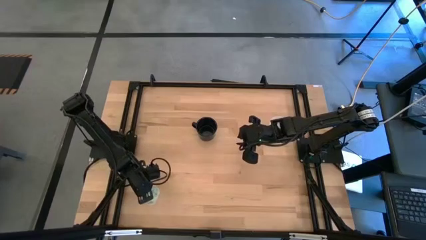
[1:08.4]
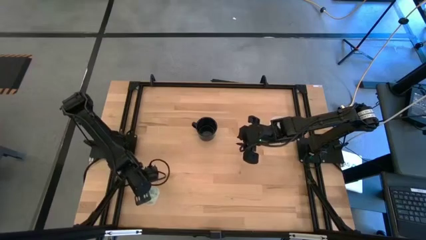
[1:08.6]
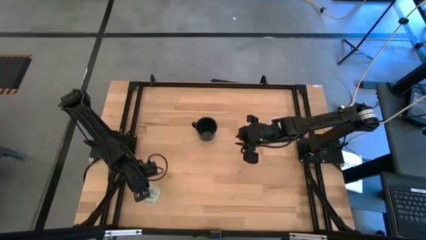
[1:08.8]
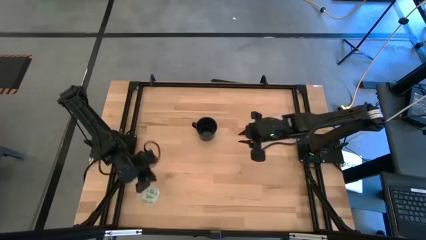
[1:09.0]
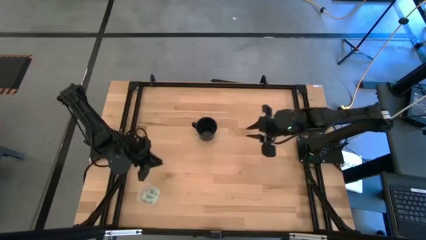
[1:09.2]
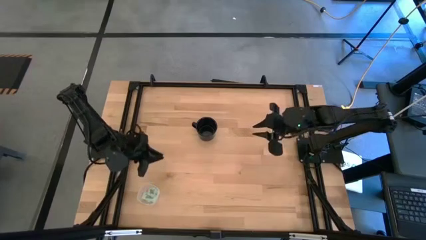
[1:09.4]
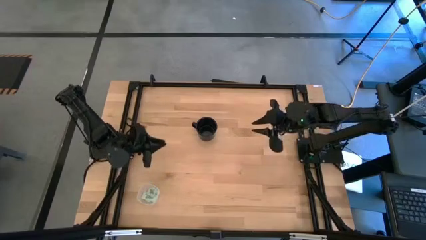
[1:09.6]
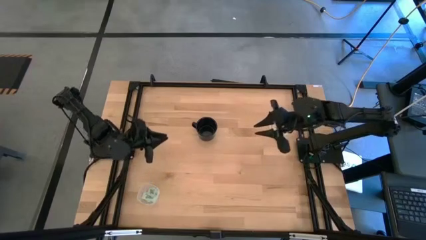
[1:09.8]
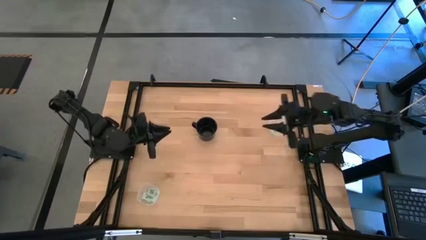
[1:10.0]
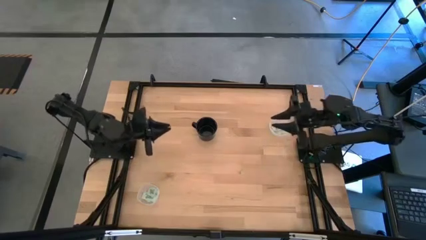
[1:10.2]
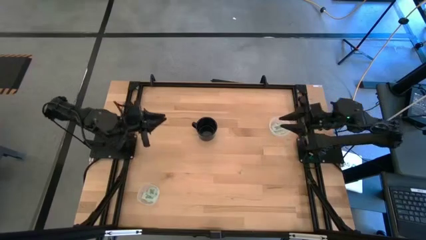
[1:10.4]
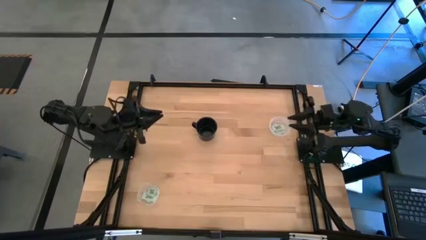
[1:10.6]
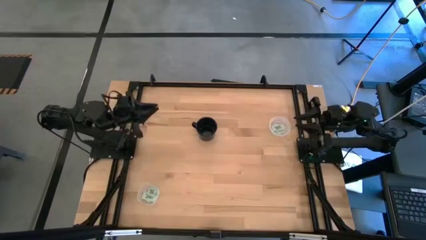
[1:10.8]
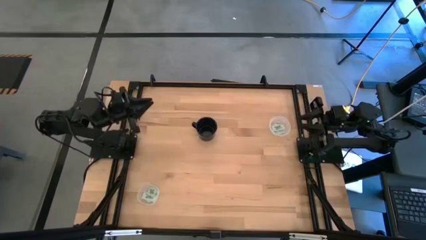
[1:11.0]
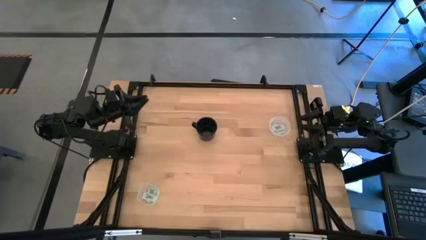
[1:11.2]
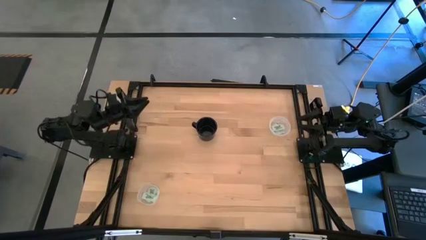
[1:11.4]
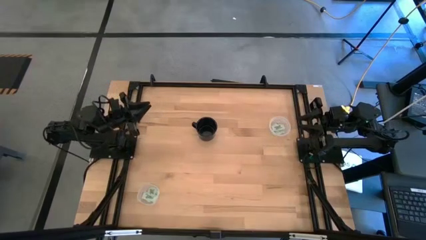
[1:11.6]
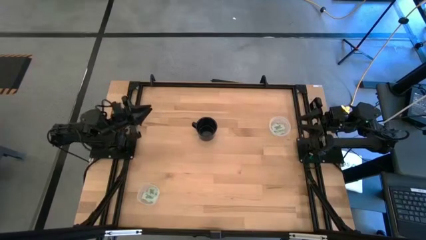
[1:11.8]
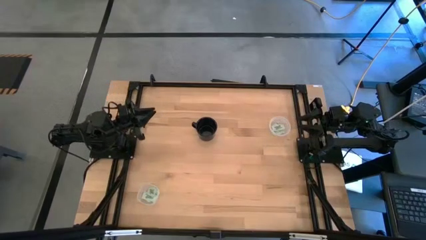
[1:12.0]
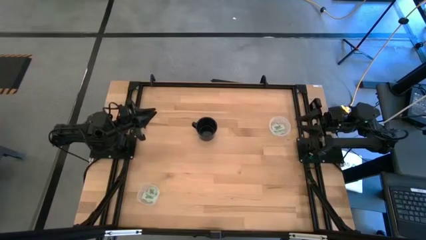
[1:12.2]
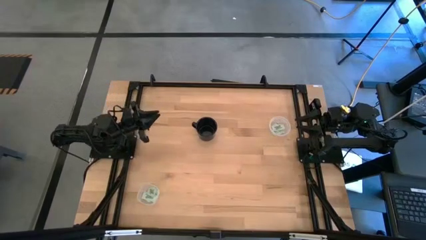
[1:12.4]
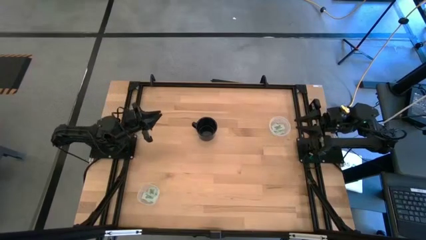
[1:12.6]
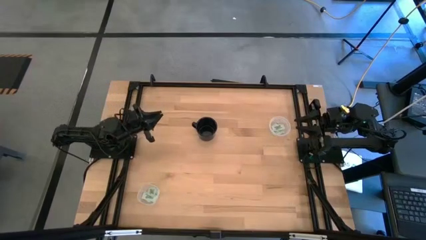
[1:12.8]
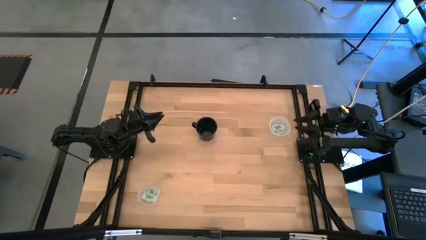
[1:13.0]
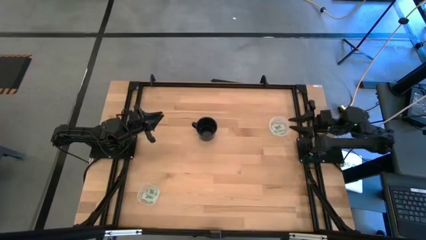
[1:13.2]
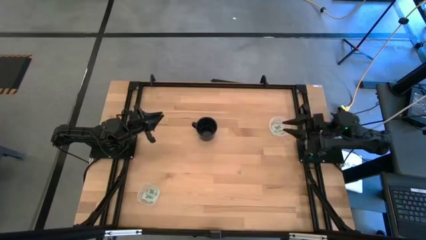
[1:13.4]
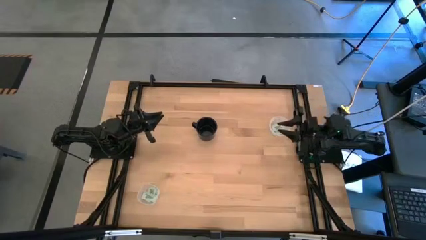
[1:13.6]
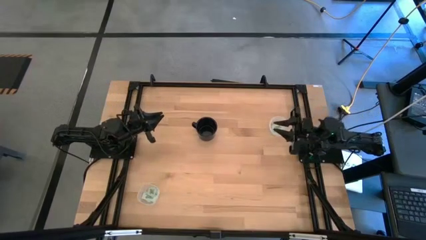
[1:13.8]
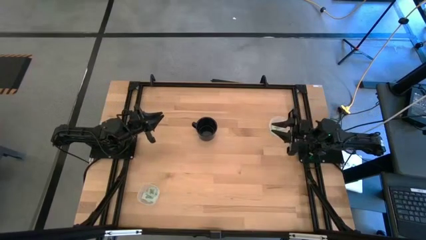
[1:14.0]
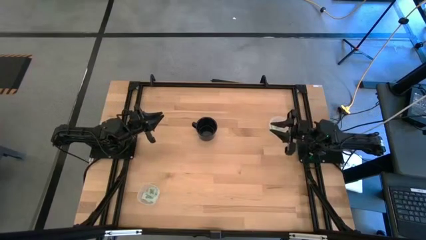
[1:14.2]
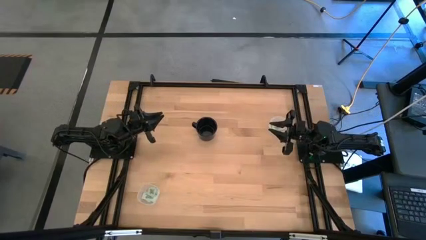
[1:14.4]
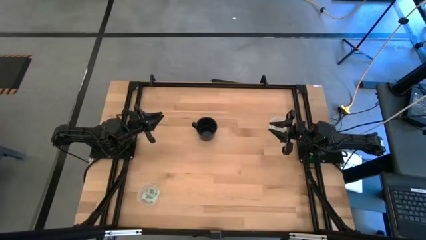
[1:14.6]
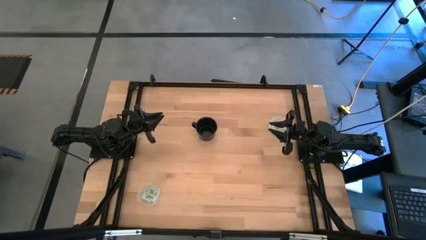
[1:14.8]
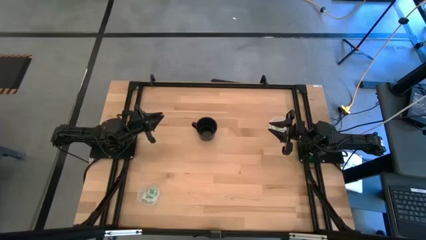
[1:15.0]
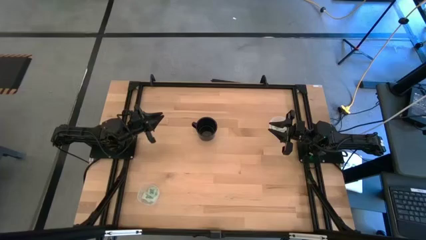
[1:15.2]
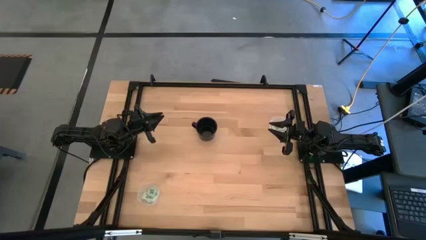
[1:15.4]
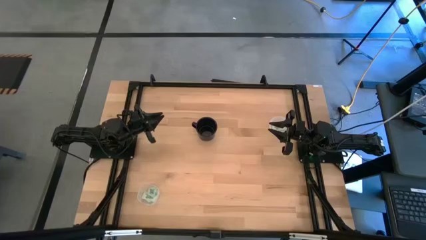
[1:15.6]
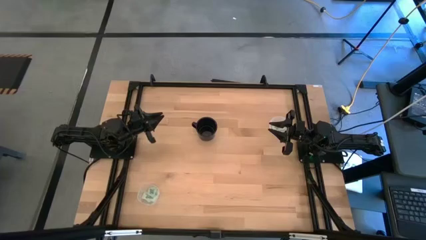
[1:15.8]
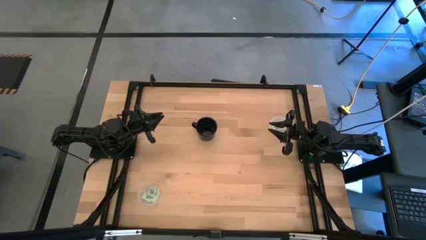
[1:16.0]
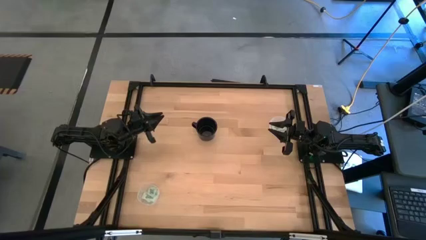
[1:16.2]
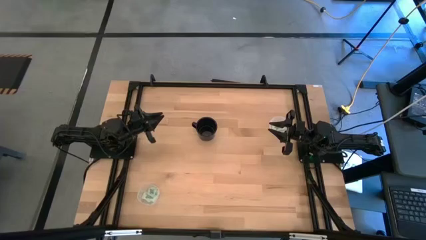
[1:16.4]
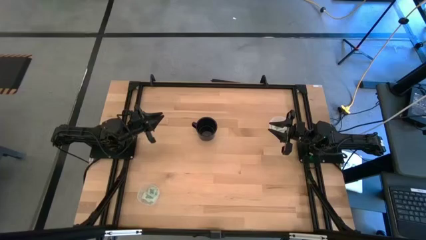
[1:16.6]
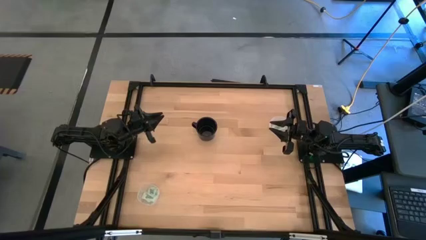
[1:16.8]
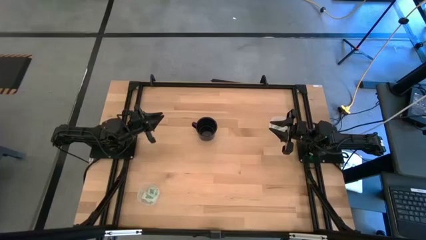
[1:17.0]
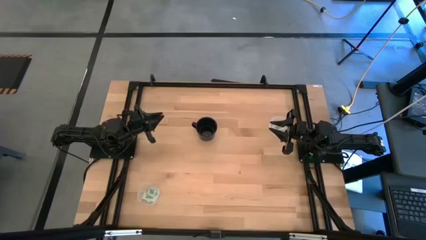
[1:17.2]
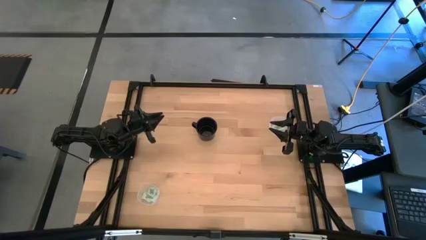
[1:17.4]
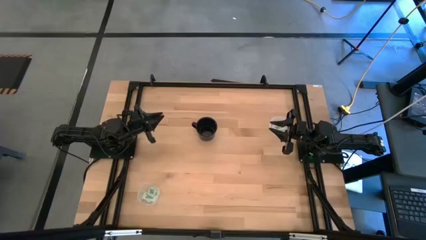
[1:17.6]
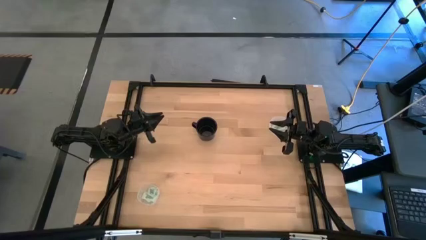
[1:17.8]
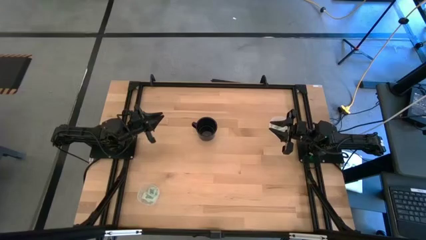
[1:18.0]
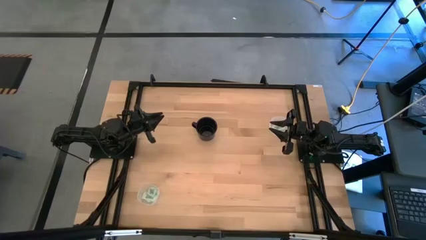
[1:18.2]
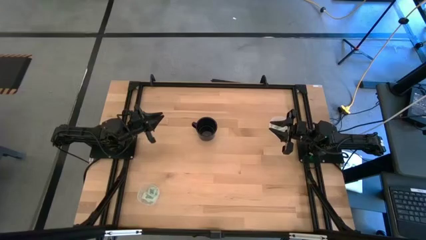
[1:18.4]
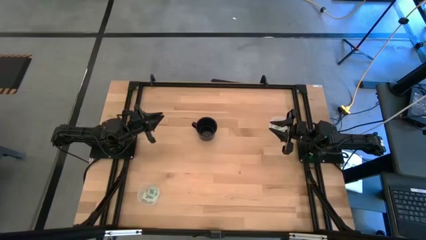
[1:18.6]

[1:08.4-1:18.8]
Task: Pick and place Stevia / Truvia into bins
Return to Home Position

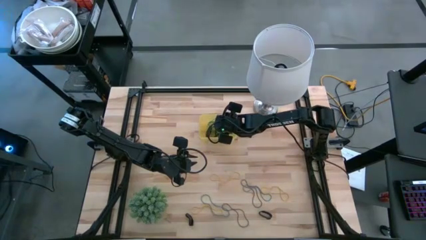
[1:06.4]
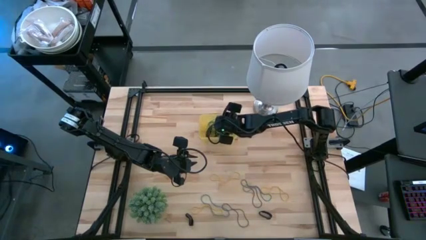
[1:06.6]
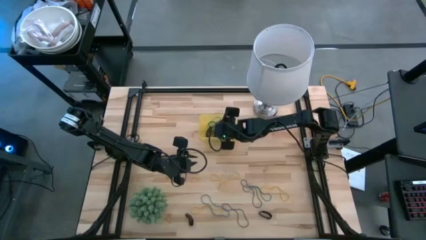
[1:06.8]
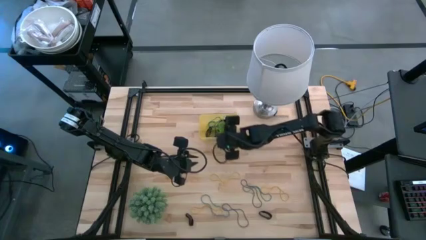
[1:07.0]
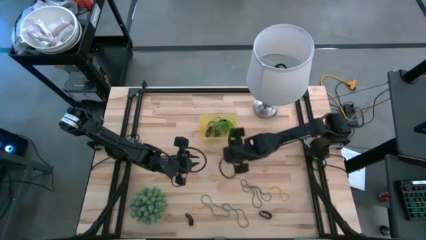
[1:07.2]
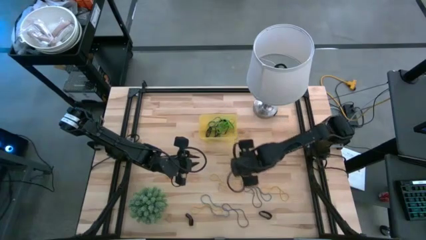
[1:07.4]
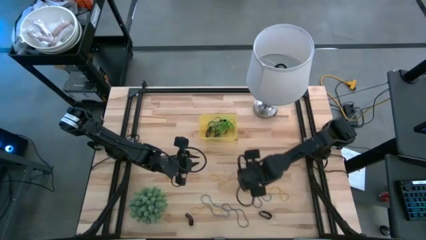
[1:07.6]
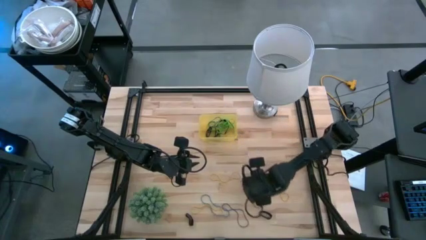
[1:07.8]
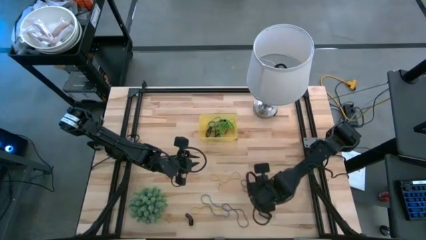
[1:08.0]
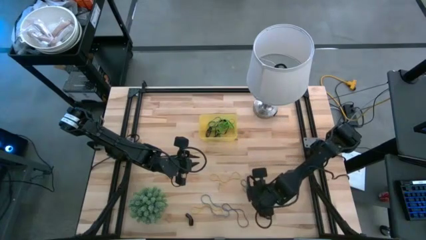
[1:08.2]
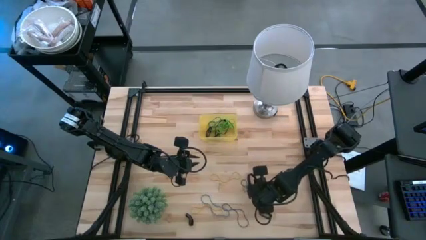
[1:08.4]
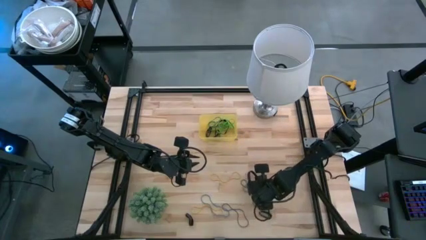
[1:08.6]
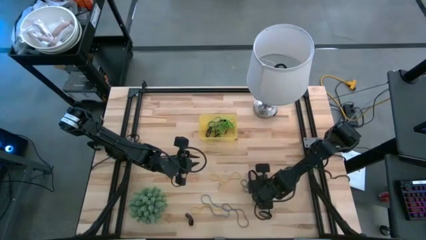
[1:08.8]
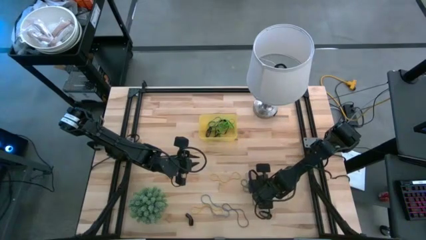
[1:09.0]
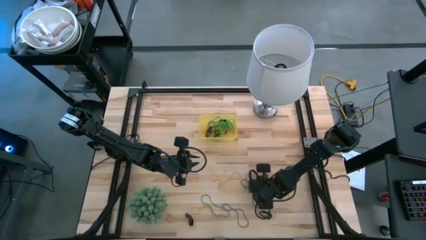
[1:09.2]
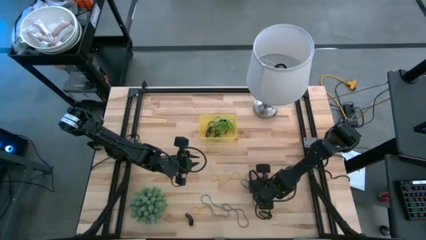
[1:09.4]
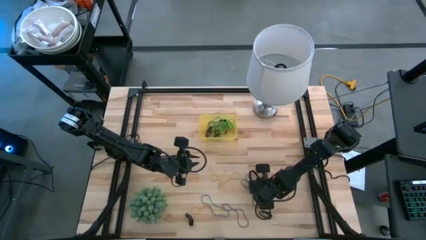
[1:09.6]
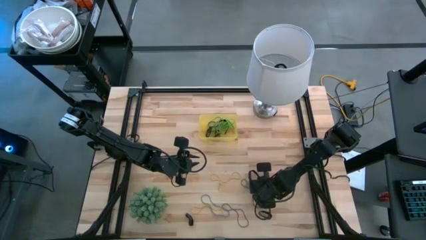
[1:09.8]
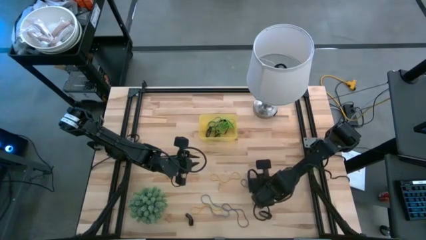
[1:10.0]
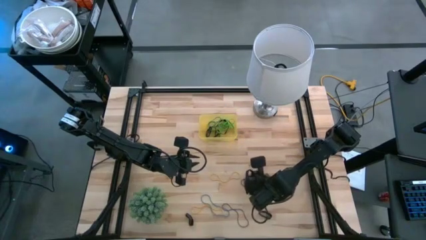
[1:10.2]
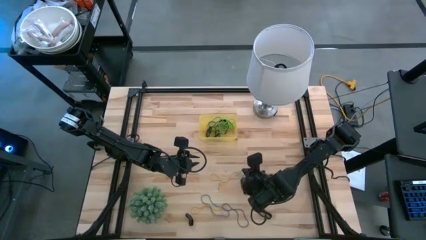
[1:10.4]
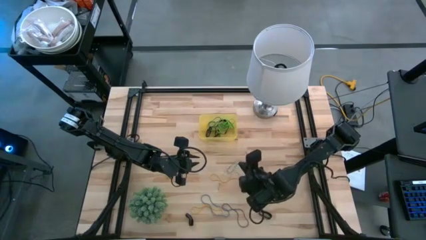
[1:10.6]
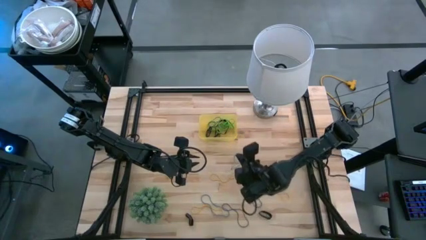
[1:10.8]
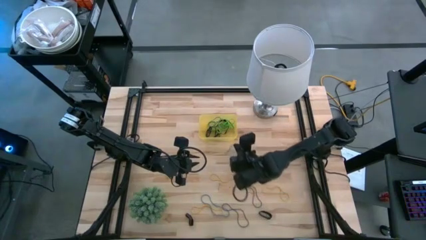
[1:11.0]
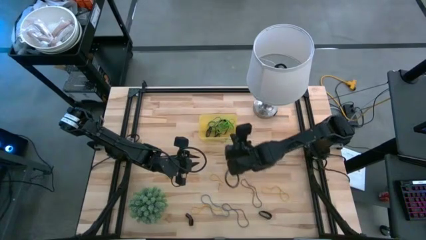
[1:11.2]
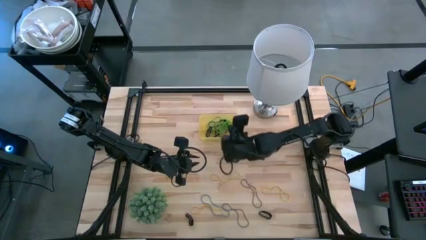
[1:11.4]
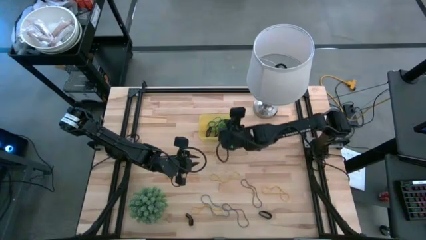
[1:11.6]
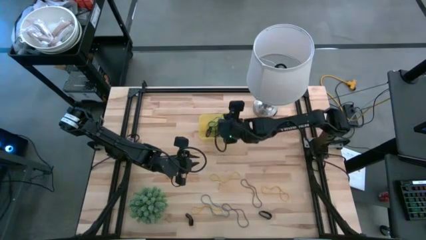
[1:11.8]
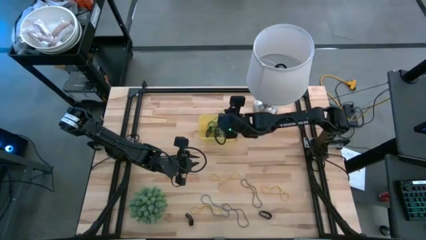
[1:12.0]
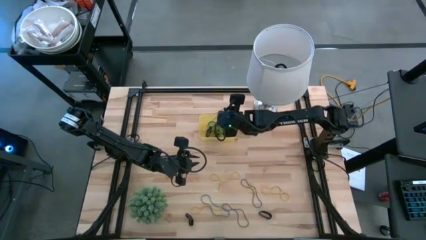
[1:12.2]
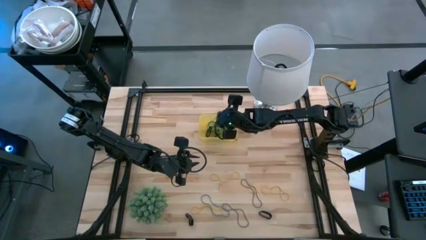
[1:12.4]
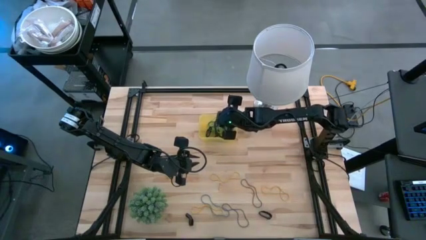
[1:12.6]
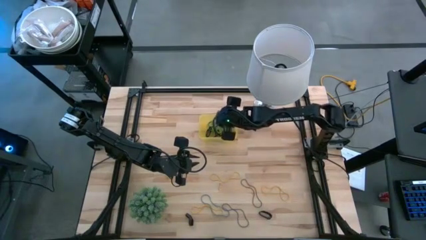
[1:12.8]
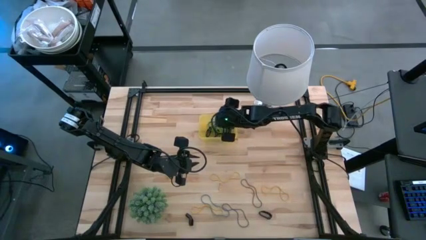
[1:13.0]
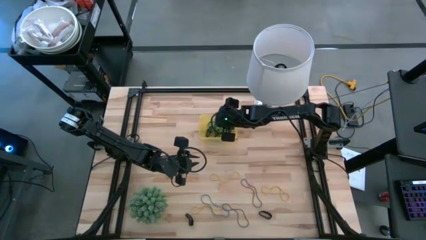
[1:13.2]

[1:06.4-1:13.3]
Task: Pick and place rubber bands into bin
Put the blue rubber band into the yellow bin
